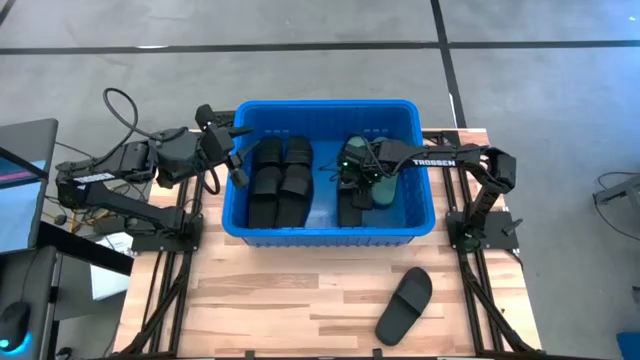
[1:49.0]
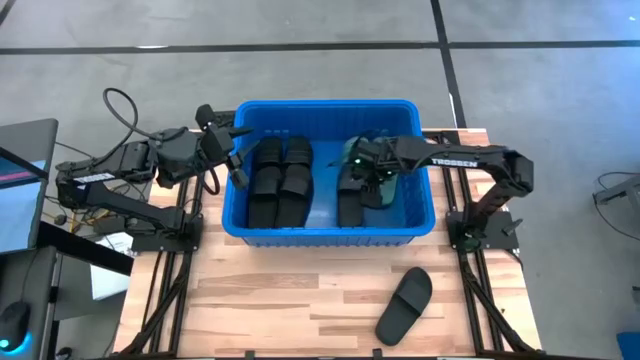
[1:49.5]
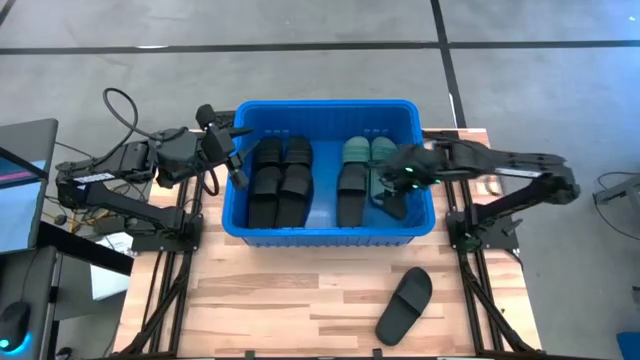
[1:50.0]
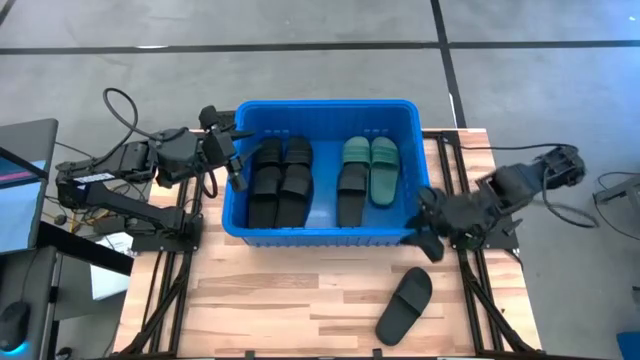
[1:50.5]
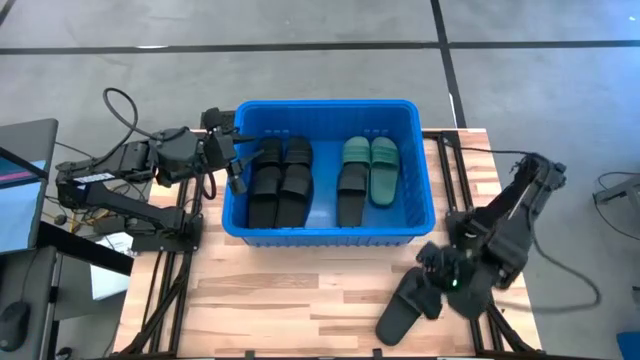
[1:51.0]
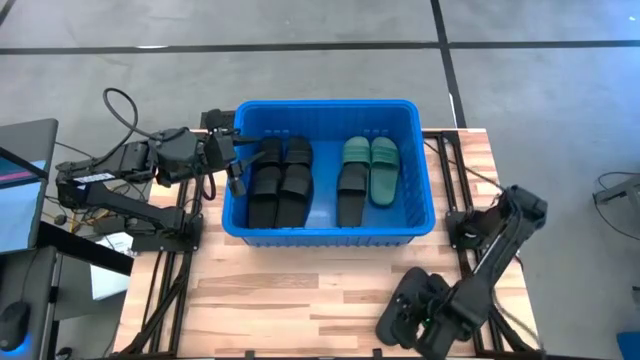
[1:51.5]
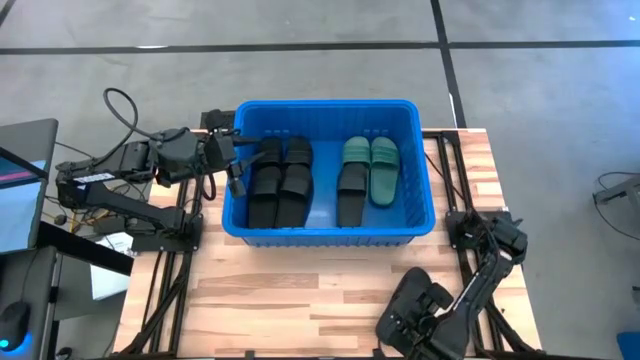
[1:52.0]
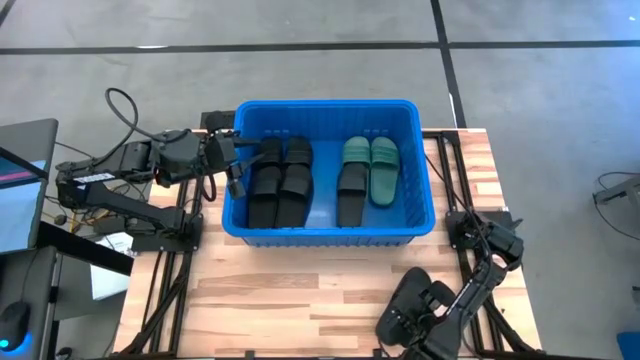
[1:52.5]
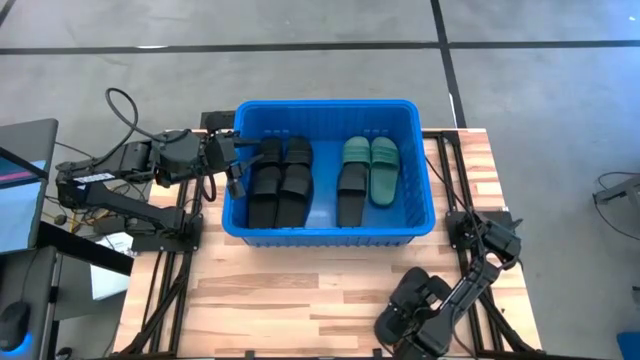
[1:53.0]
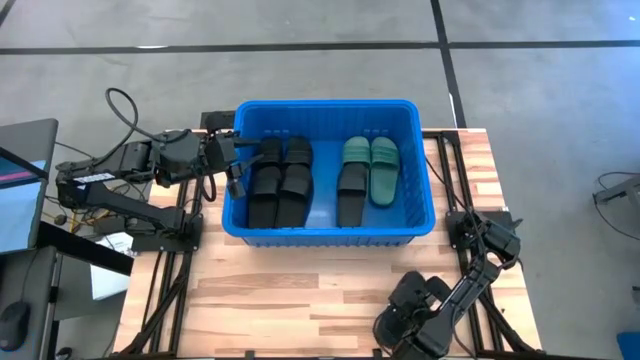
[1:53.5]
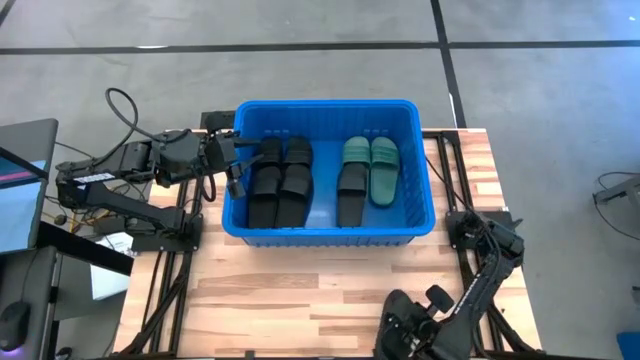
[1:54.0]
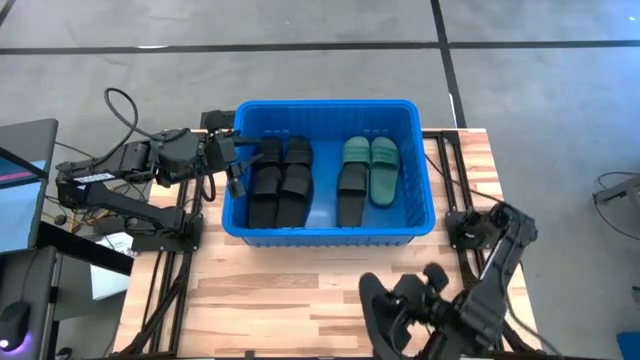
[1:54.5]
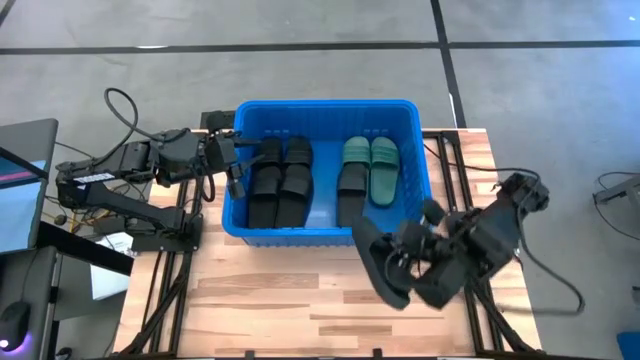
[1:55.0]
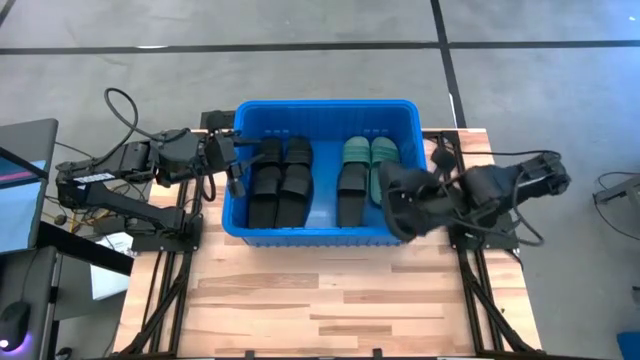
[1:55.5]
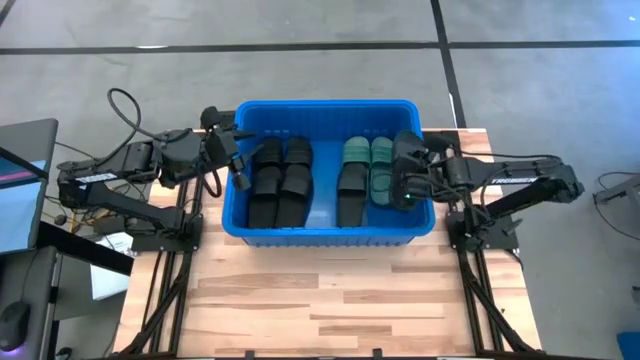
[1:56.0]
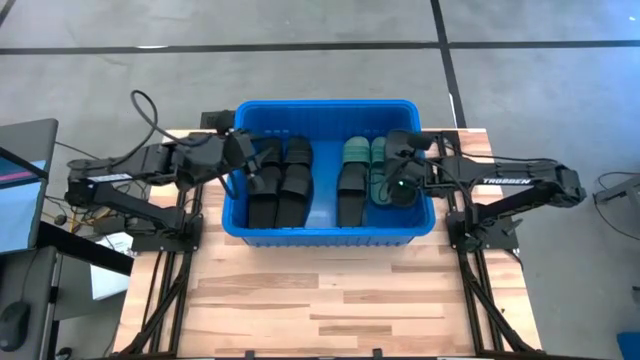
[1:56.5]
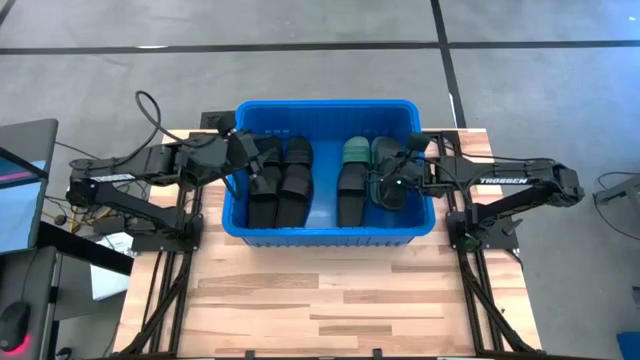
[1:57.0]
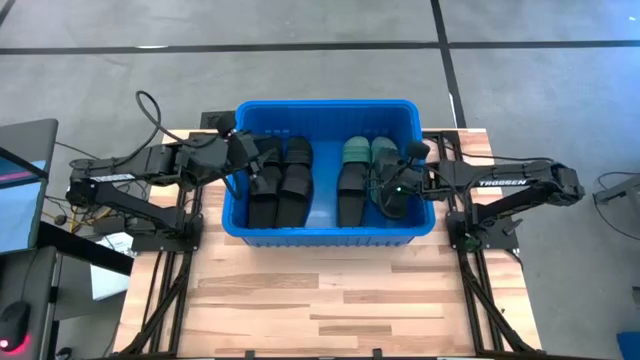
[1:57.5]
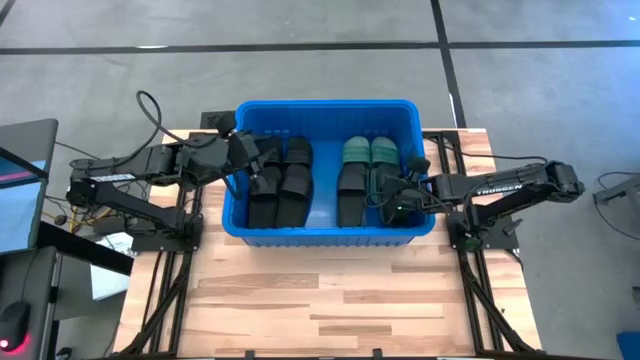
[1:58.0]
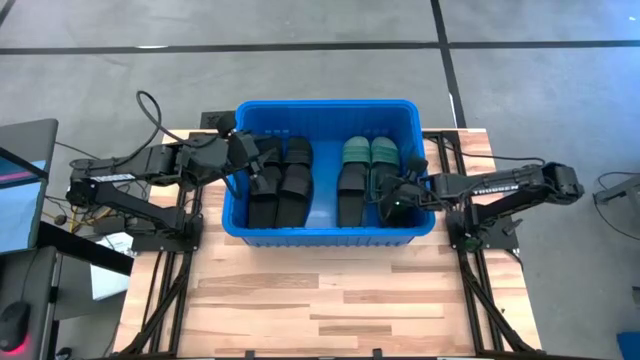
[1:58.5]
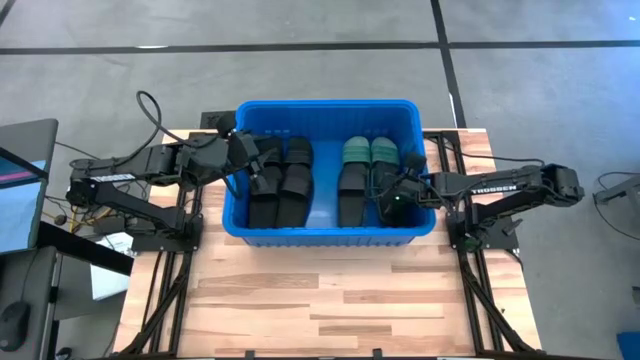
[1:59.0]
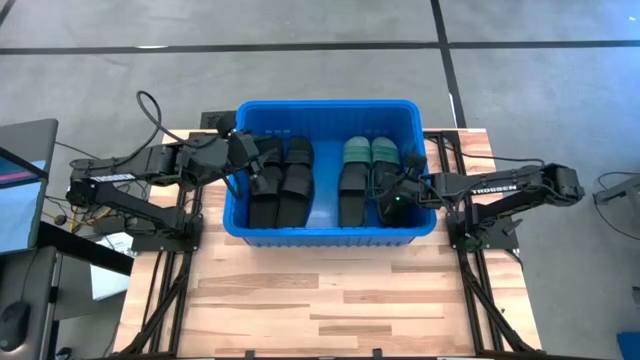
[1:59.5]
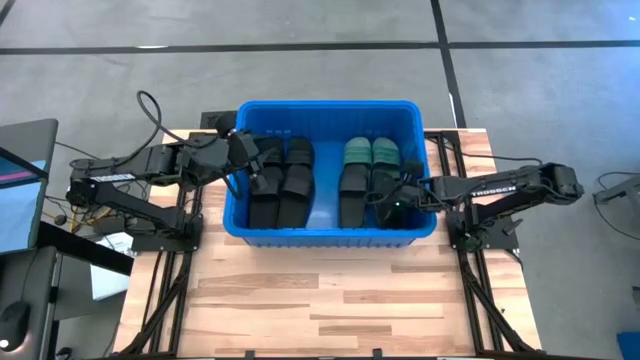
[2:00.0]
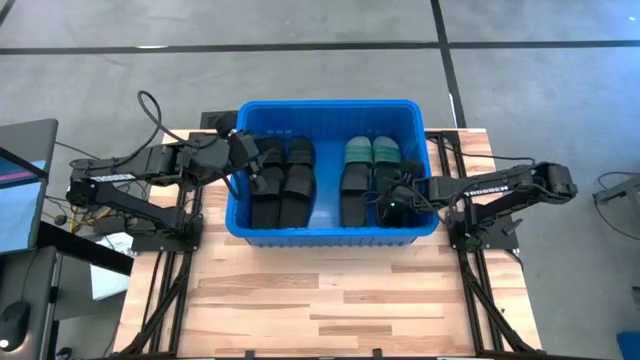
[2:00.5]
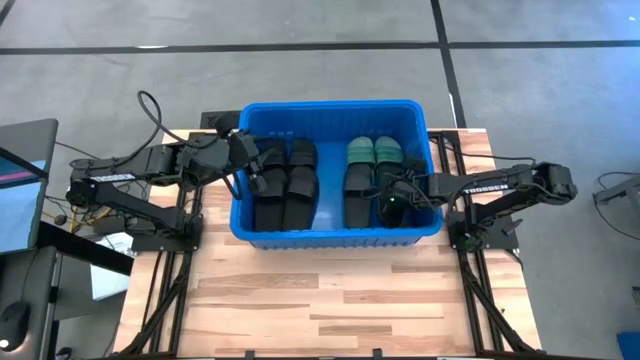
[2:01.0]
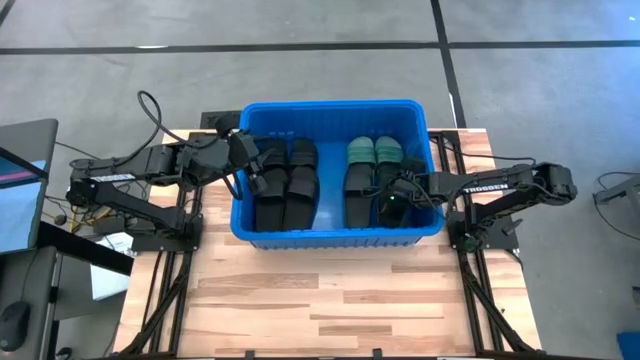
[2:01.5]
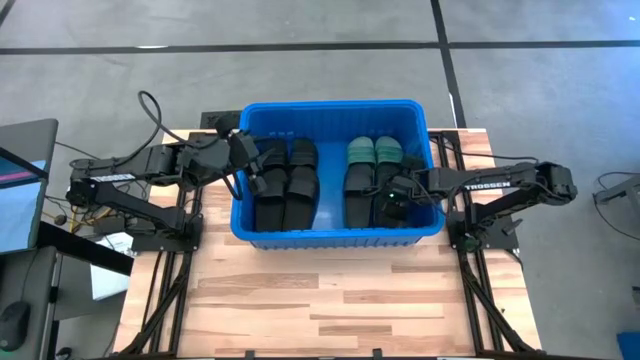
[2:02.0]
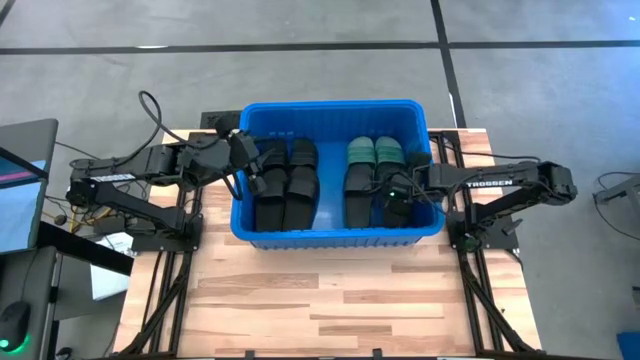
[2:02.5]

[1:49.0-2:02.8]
Task: Pick and place slides into bin
Put the black slide into the blue bin

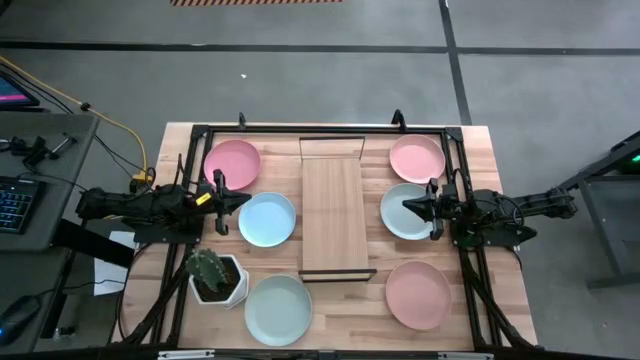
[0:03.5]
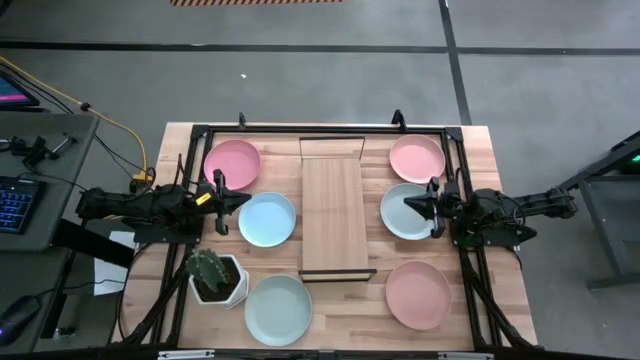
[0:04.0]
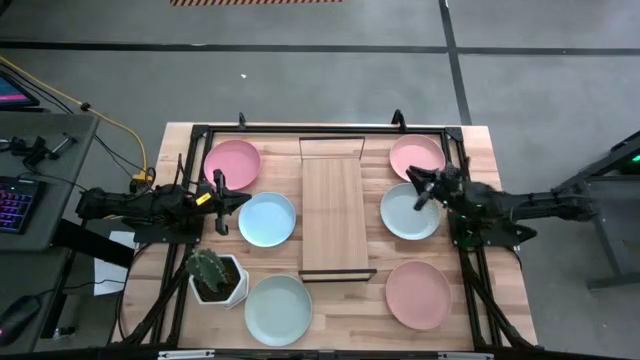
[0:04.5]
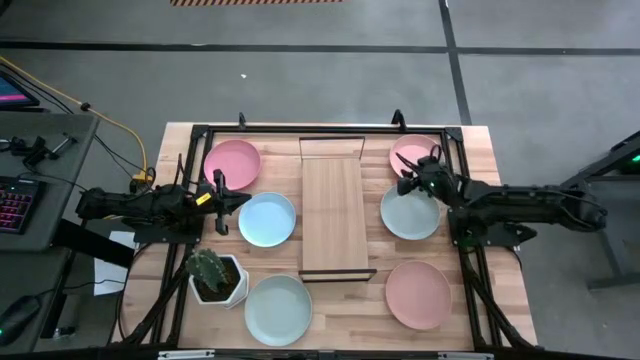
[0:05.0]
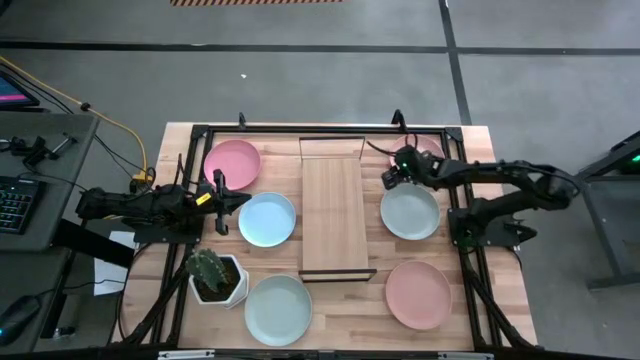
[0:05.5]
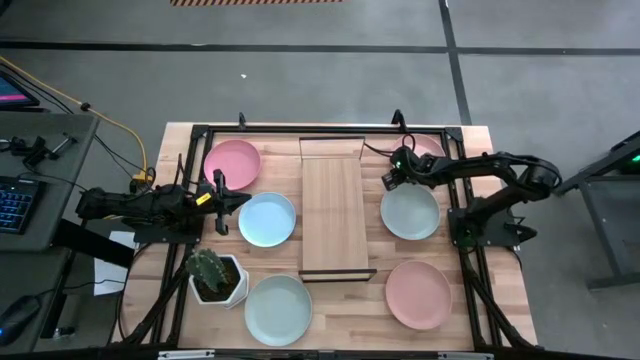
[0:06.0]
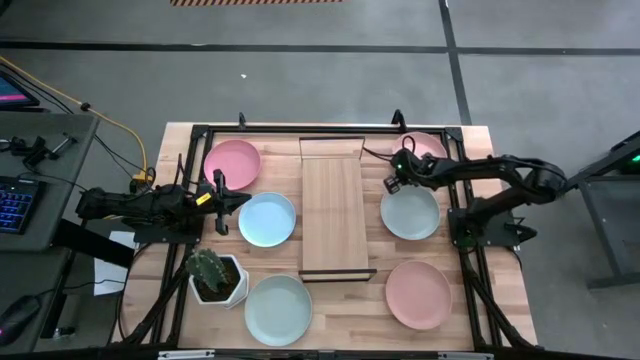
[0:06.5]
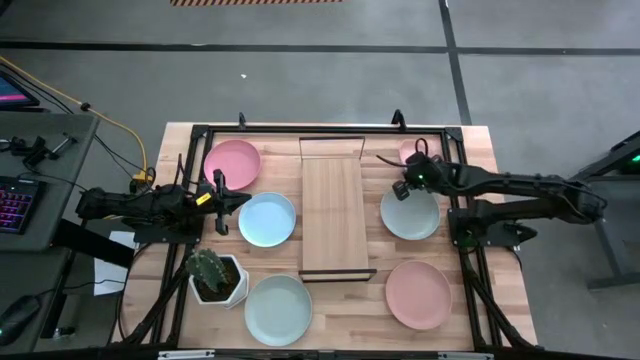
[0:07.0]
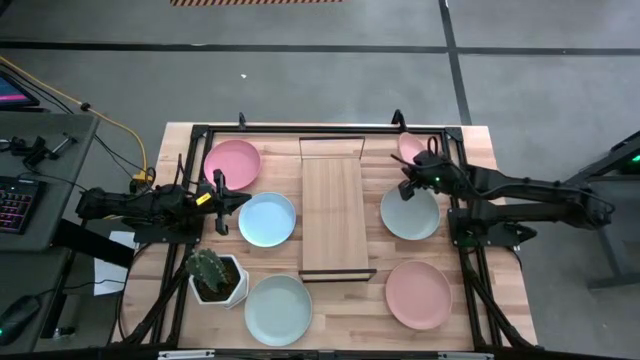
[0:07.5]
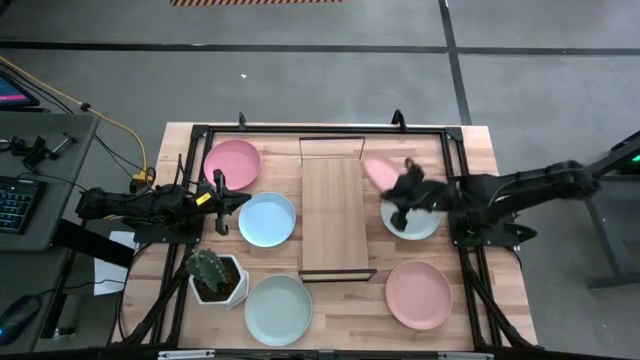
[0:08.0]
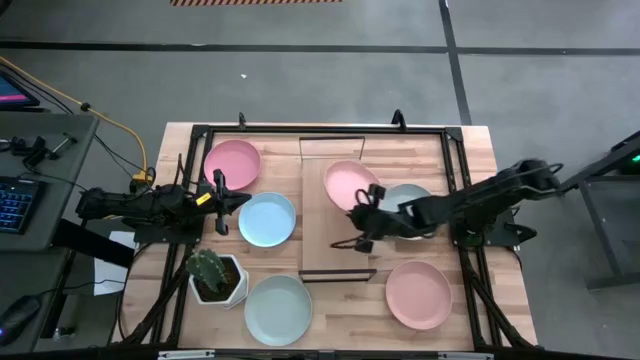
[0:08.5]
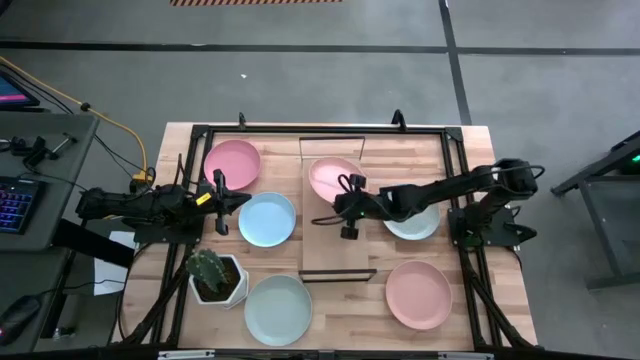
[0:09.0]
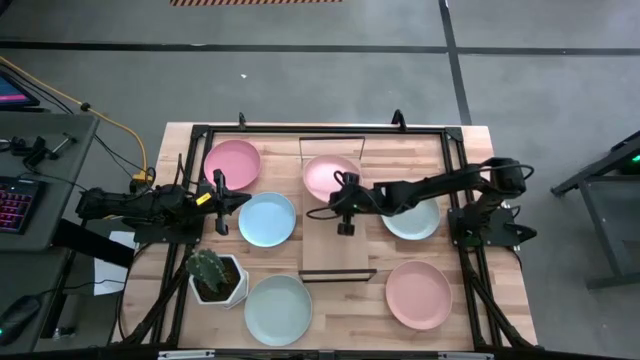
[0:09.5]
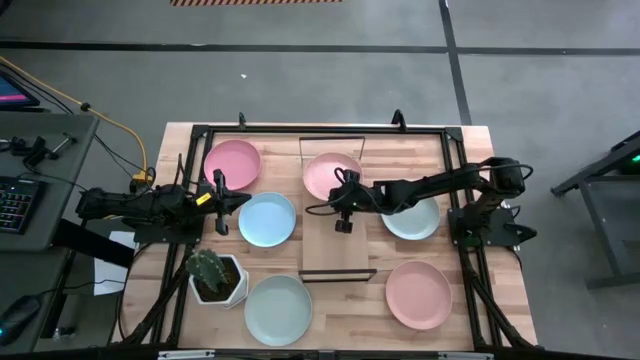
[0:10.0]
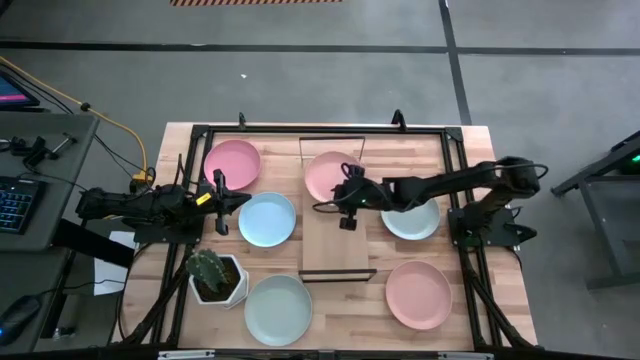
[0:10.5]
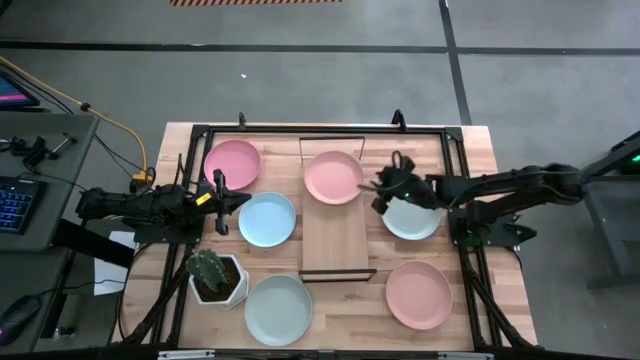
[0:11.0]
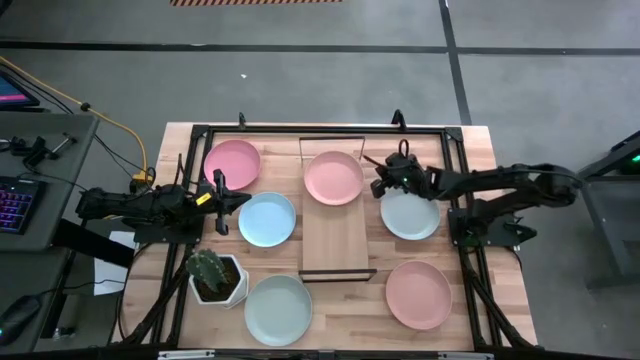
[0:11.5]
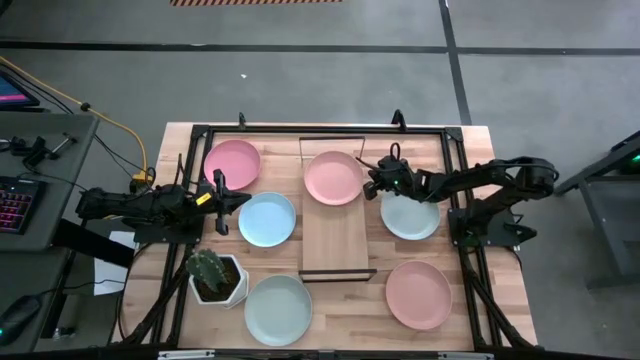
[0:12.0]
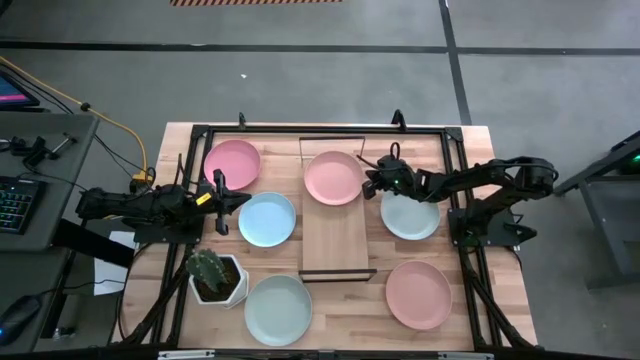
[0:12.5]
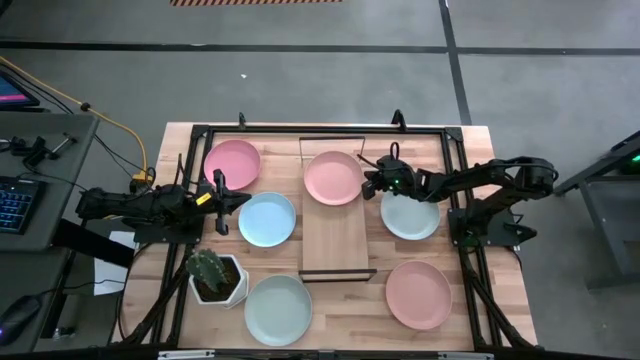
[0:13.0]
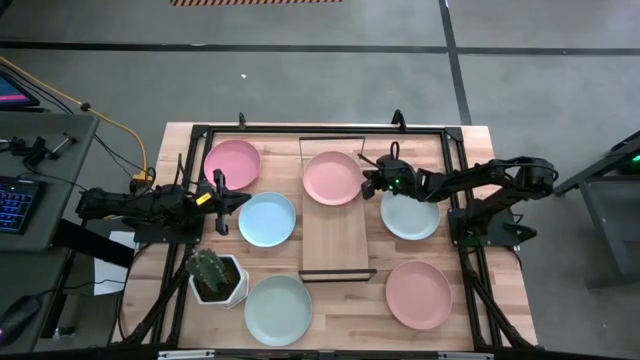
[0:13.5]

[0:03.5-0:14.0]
Task: Place and stack plates onto a shelf
Put the top light pink plate on the shelf
